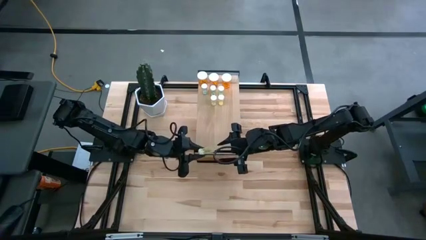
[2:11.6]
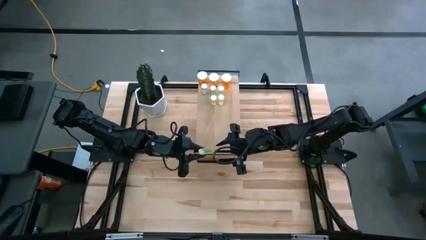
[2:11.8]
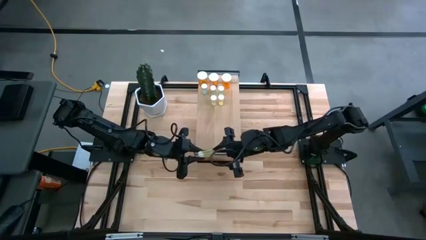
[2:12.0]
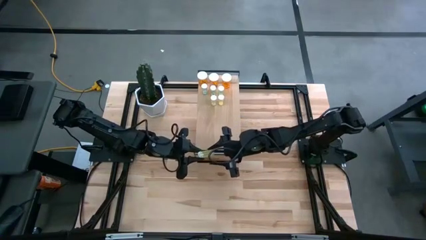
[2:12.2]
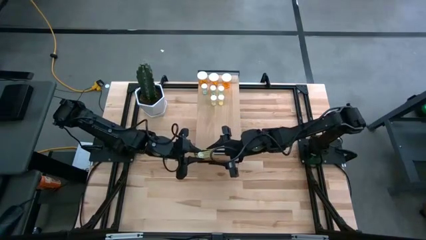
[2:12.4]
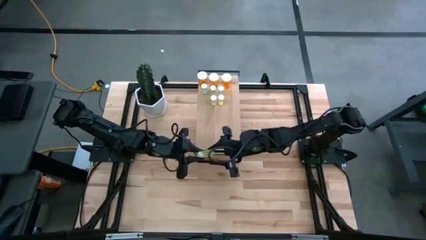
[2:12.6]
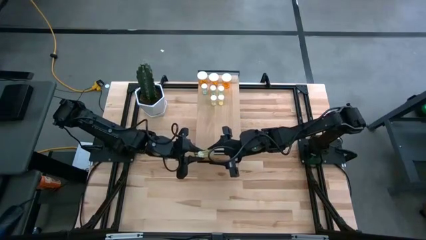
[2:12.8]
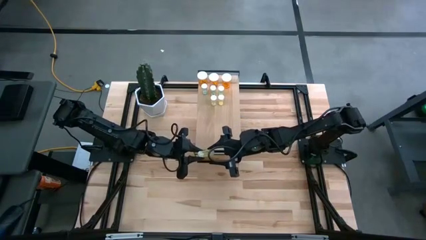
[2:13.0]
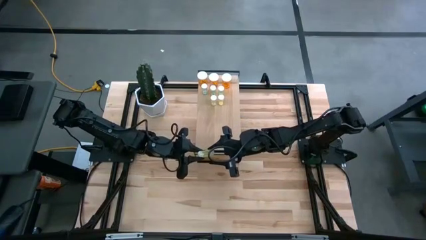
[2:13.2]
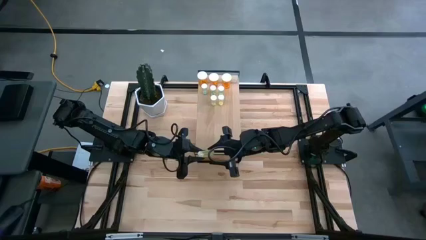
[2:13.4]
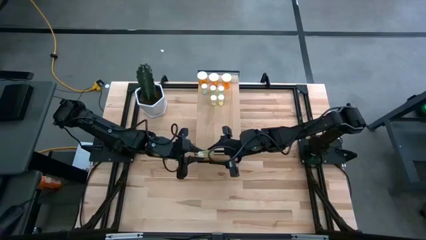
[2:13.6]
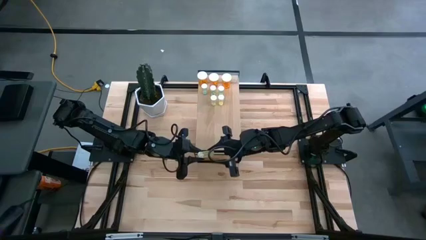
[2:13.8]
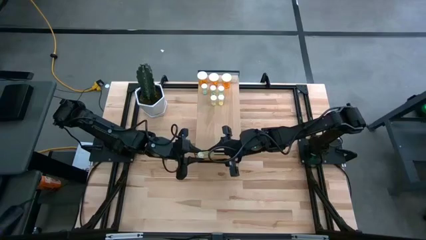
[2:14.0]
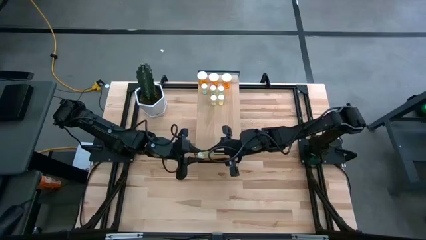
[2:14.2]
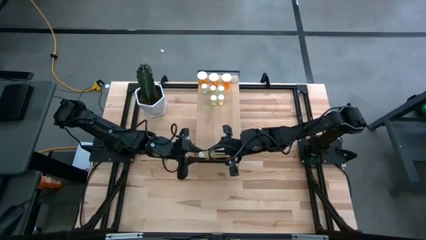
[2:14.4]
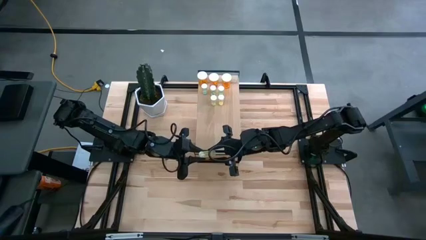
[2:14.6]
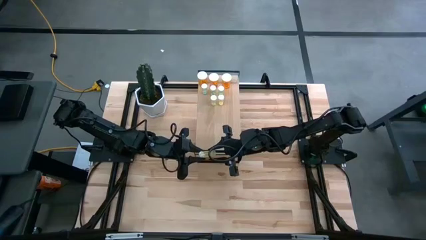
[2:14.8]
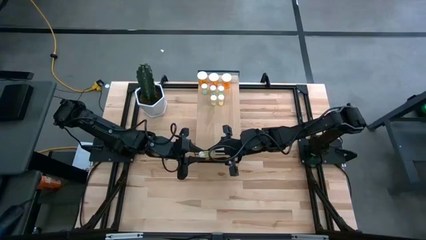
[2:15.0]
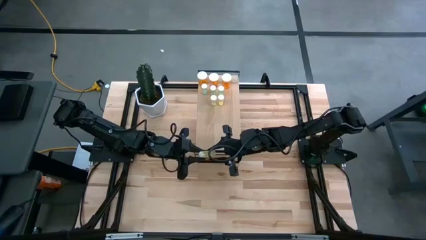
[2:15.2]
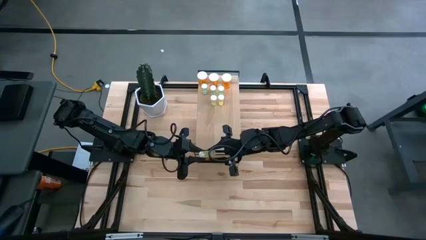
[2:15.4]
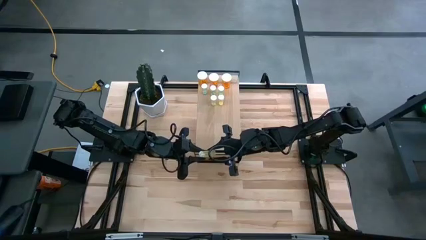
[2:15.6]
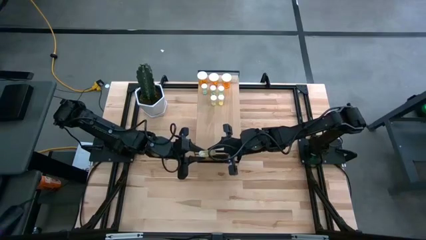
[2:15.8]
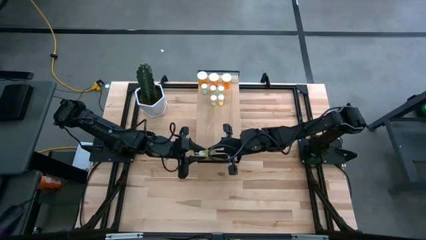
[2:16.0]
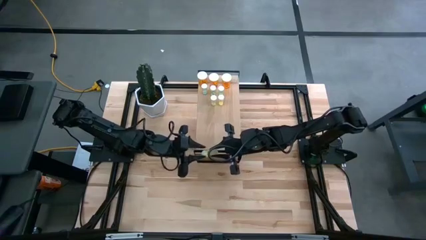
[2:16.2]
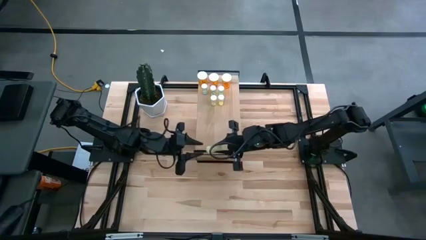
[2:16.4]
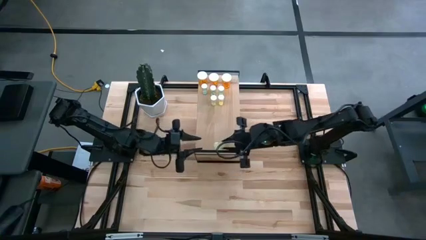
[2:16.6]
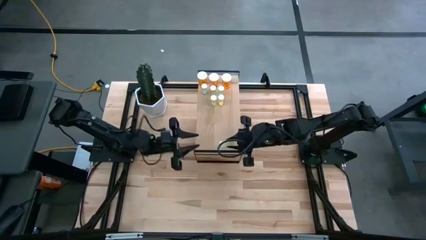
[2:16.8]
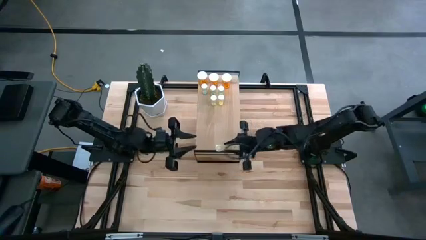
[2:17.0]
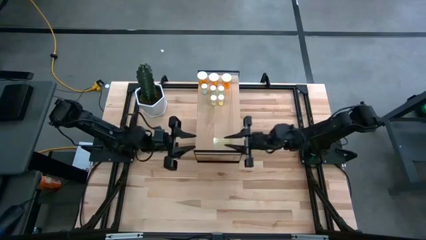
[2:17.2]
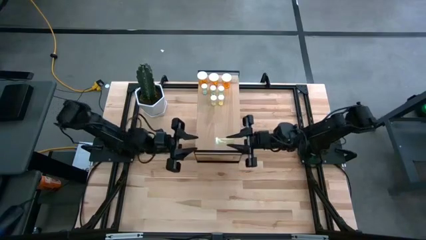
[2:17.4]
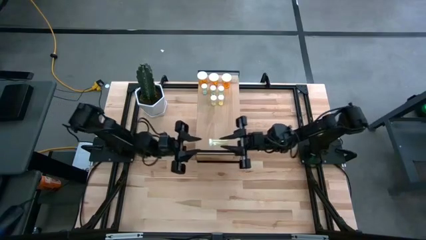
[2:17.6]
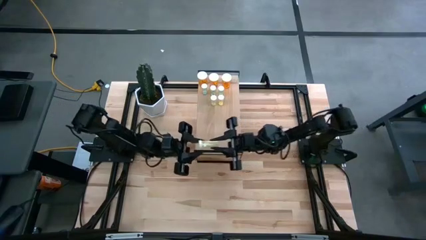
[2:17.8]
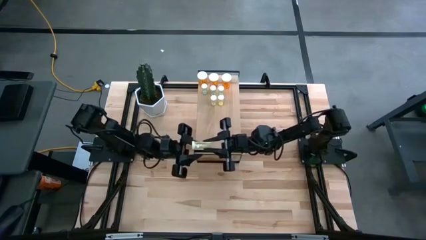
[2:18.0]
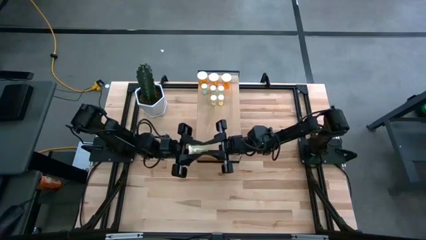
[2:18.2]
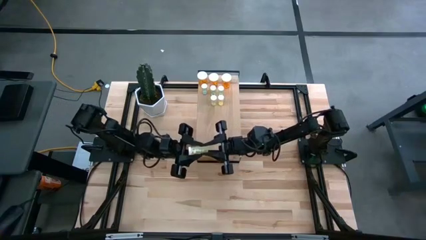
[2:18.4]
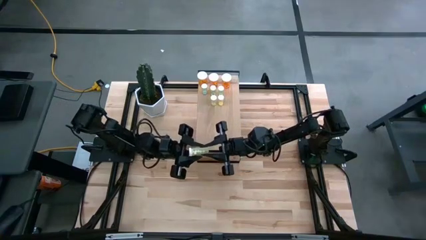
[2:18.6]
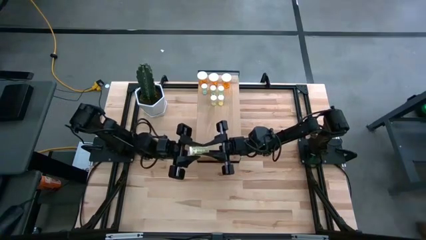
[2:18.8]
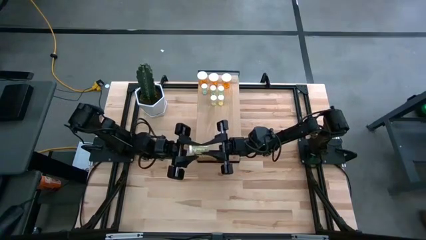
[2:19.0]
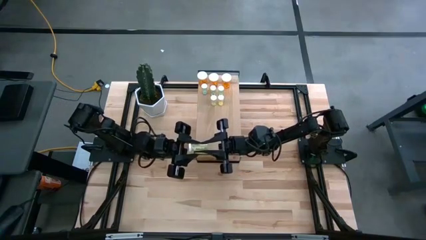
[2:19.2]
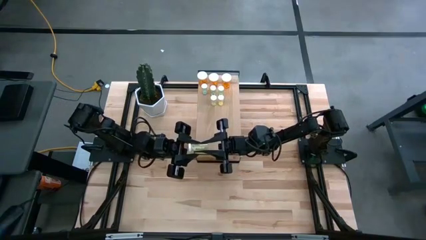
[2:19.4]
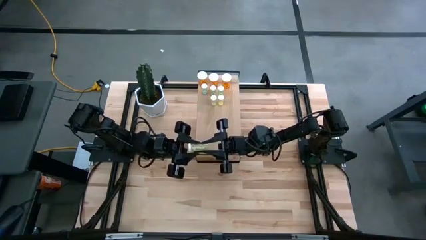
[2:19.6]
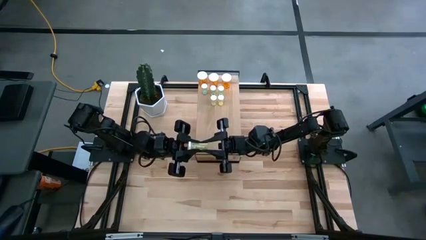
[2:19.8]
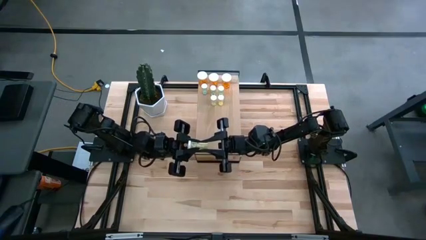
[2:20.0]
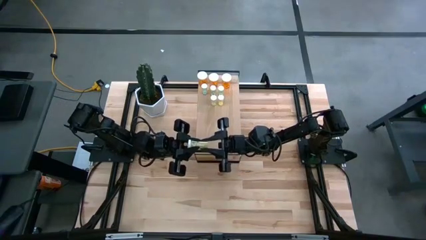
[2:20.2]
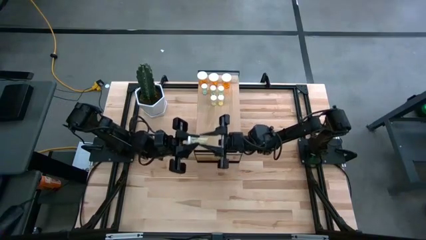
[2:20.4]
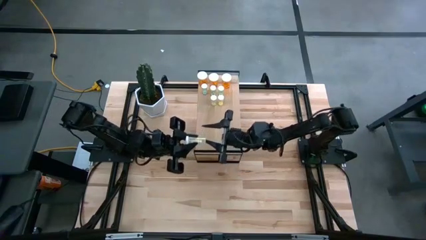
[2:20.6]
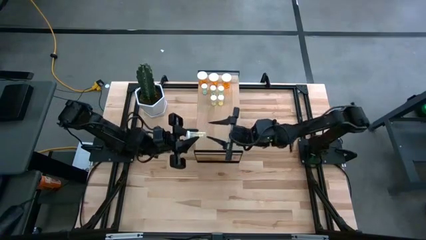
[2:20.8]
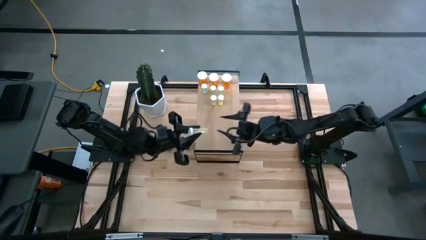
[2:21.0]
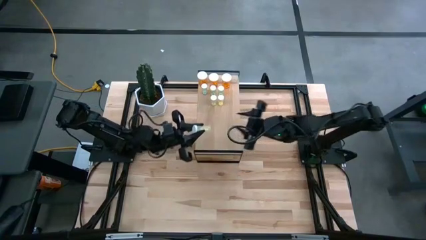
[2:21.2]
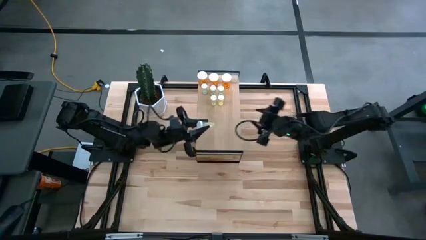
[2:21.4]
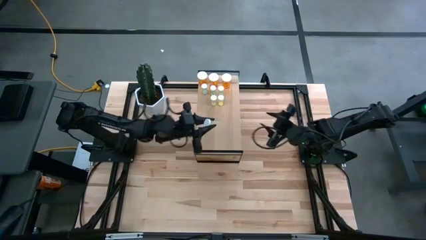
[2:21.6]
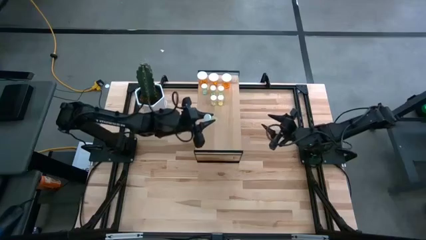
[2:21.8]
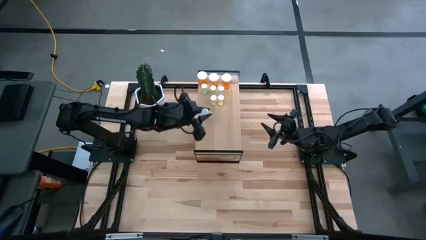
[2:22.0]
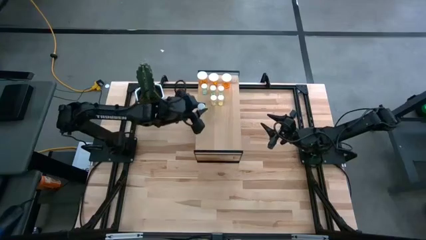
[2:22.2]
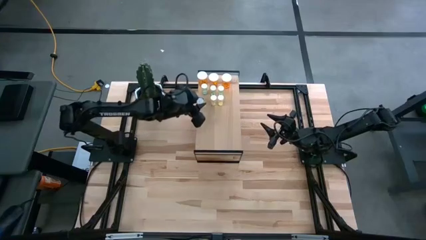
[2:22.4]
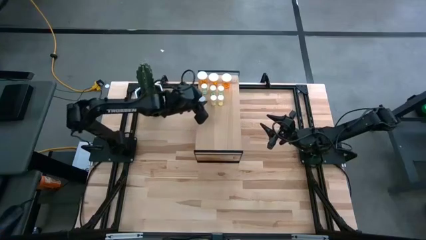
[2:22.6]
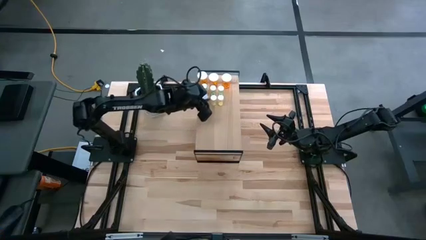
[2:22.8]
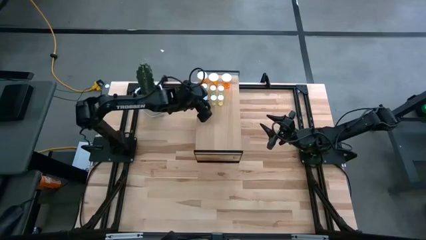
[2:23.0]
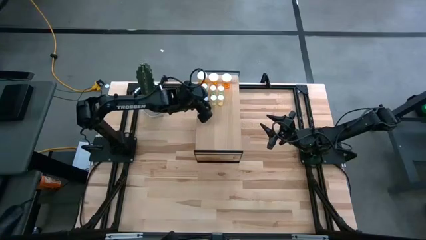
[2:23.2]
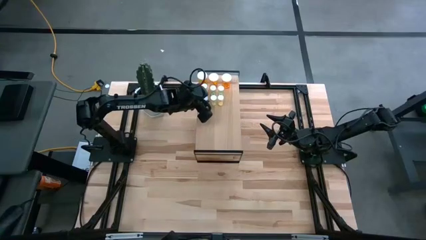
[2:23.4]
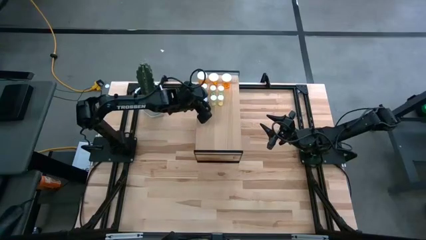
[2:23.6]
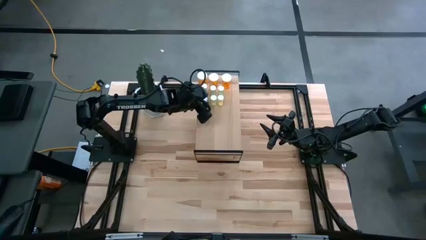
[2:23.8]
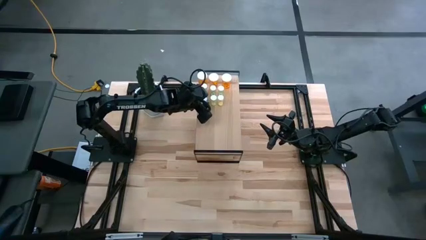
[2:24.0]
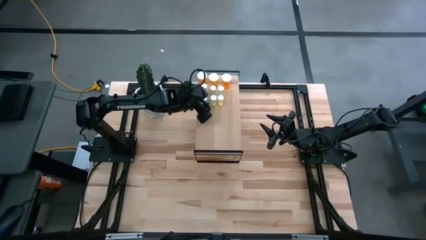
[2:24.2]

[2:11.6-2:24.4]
Task: Pick and place medicine bottles onto shelf by color
Put the yellow pill bottle on the shelf aligned with the other yellow pill bottles

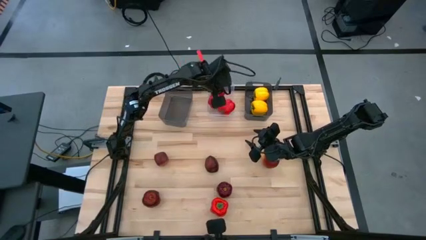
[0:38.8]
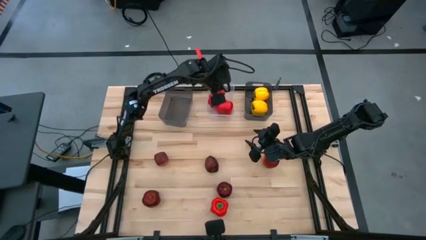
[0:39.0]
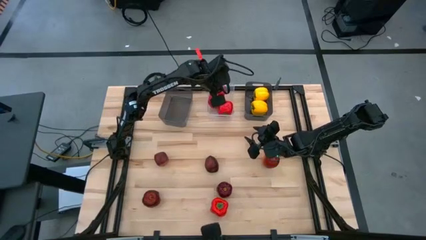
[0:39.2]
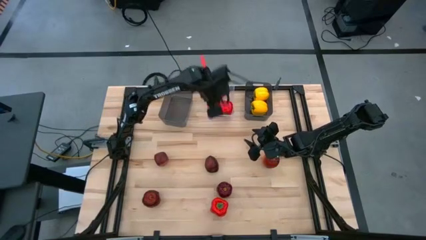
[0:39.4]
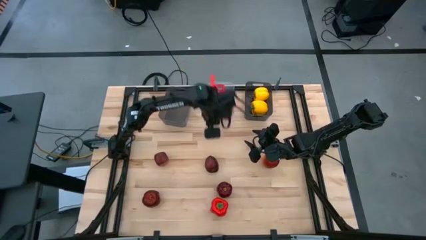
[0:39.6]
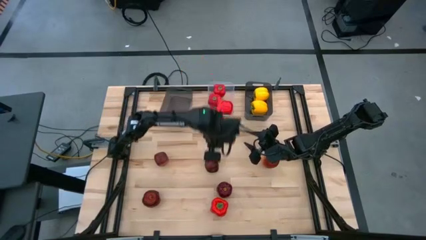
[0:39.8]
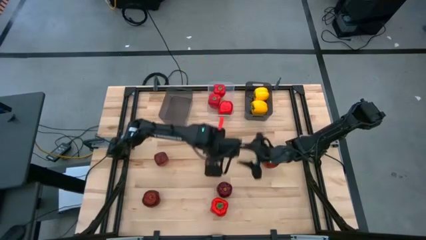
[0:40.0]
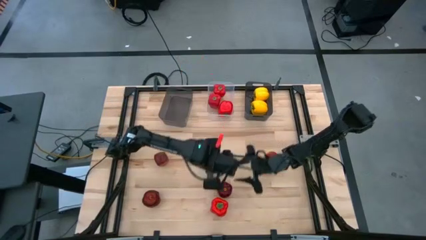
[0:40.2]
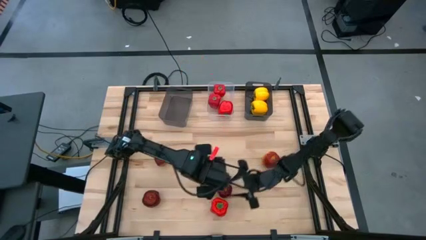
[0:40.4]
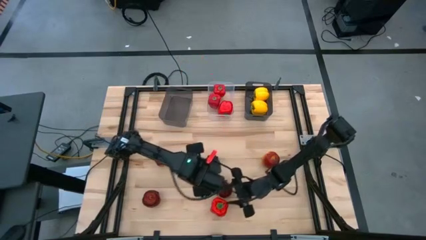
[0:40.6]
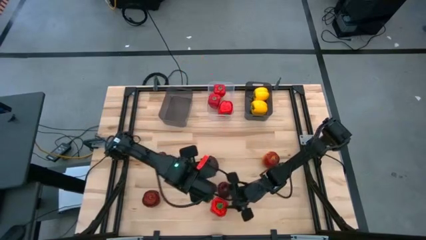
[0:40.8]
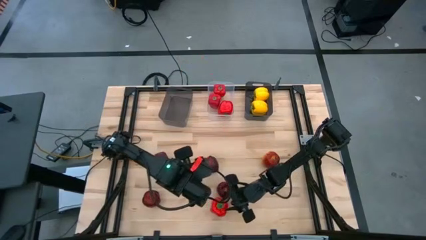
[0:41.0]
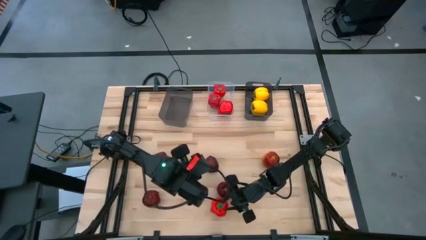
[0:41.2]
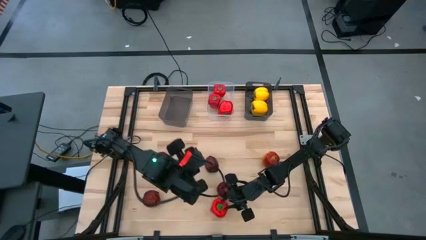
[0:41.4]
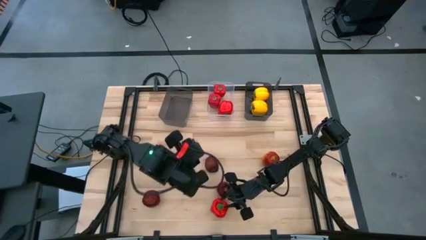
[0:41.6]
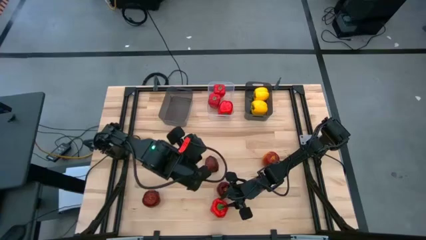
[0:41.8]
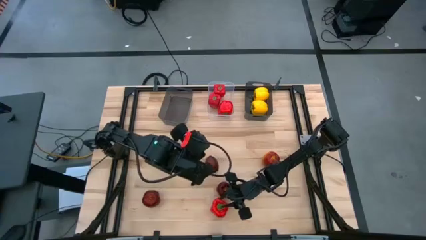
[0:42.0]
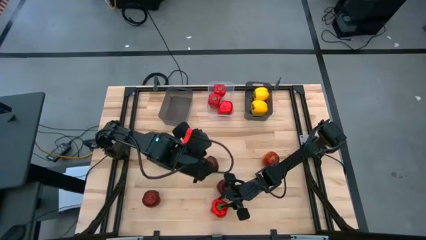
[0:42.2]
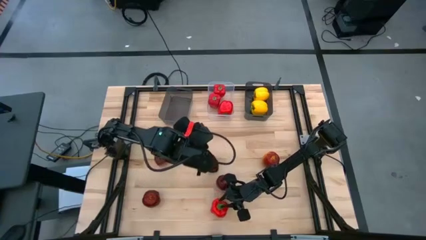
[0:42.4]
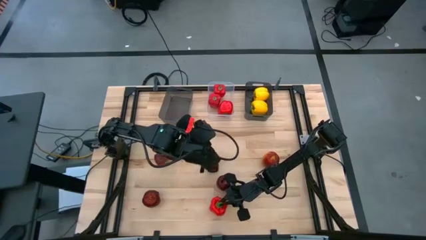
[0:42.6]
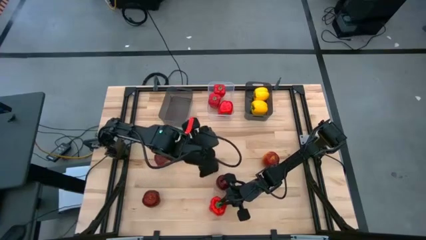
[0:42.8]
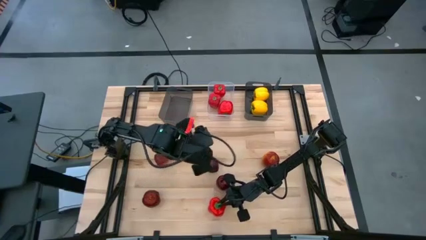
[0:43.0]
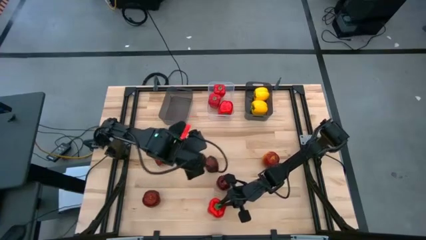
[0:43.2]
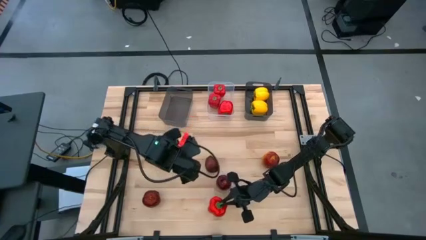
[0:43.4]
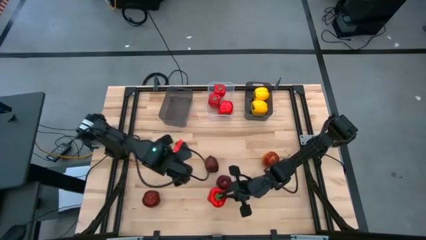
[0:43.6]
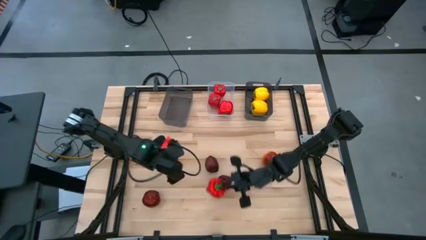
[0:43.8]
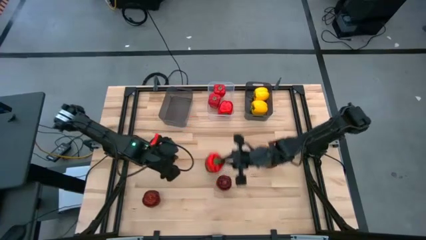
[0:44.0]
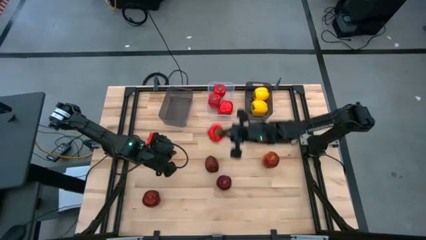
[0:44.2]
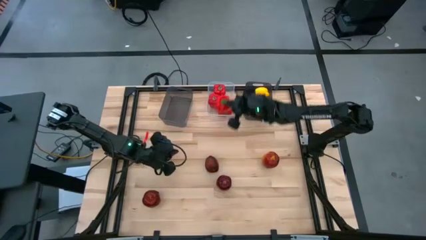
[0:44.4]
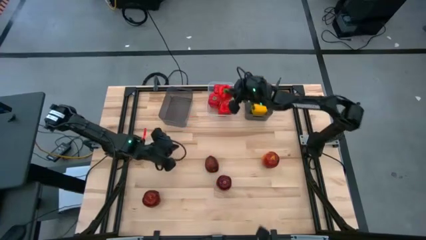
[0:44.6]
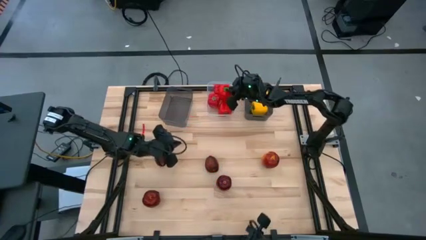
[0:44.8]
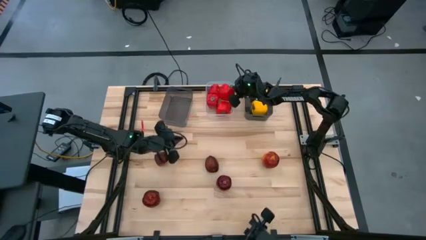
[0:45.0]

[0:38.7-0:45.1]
Task: Sort produce into baskets
Put the red bell pepper into the transparent bin
